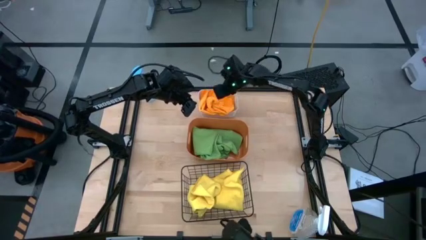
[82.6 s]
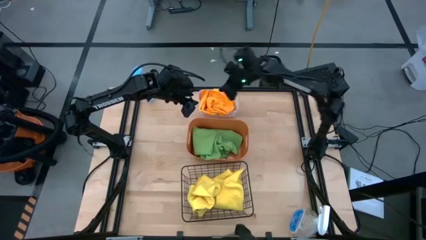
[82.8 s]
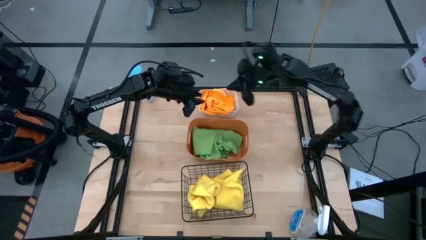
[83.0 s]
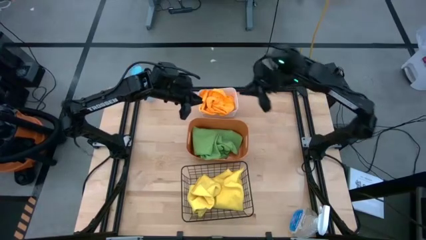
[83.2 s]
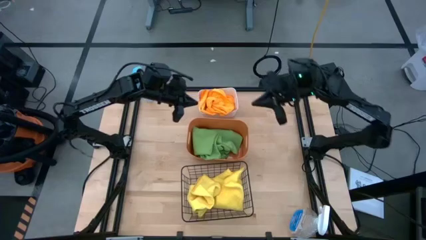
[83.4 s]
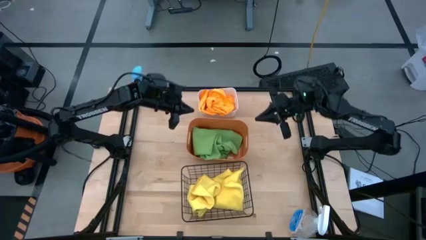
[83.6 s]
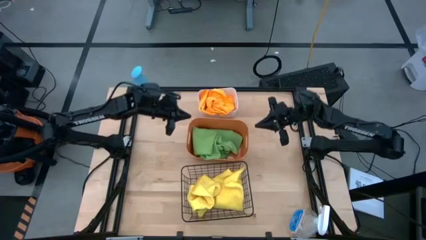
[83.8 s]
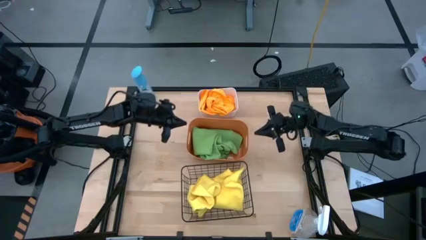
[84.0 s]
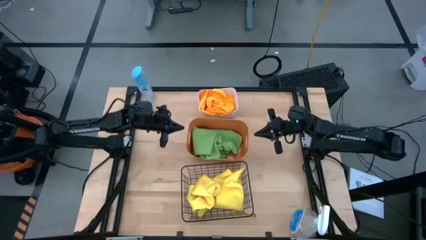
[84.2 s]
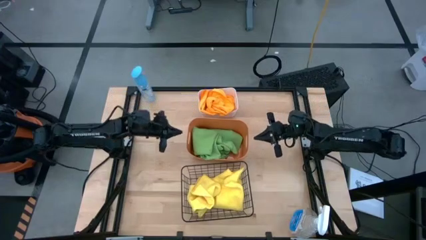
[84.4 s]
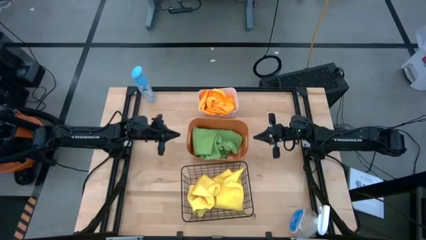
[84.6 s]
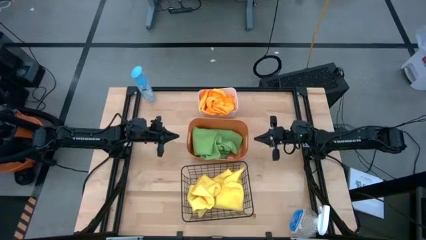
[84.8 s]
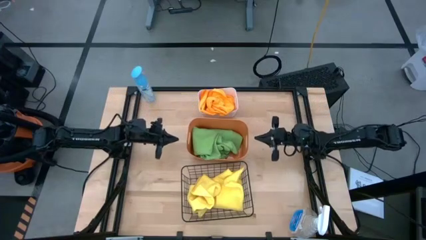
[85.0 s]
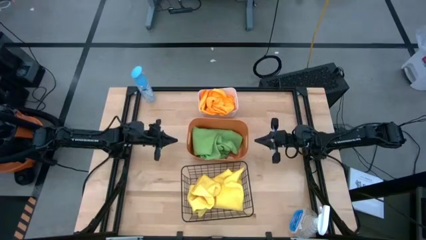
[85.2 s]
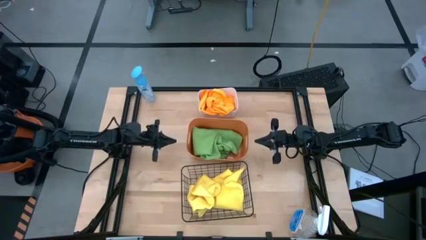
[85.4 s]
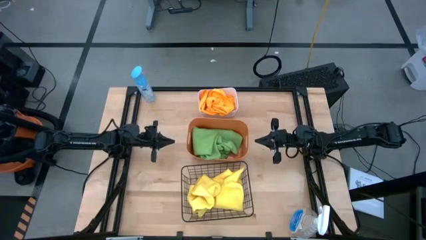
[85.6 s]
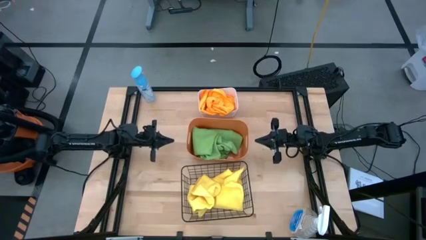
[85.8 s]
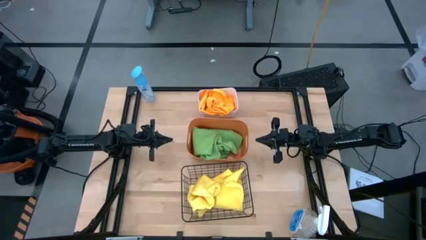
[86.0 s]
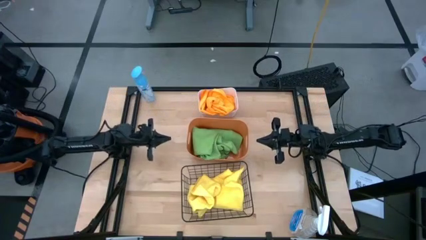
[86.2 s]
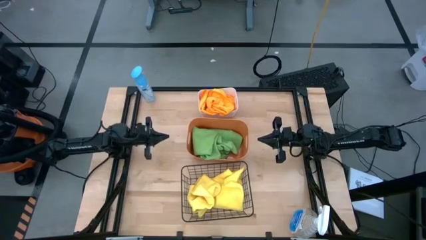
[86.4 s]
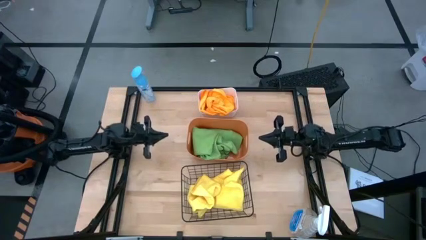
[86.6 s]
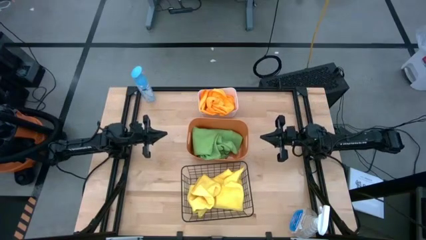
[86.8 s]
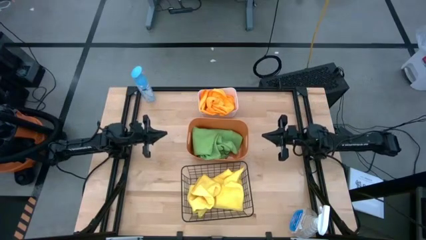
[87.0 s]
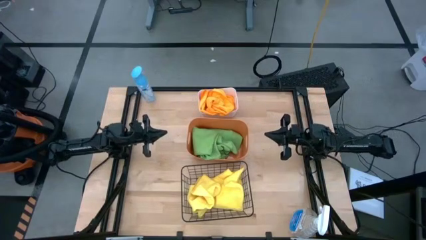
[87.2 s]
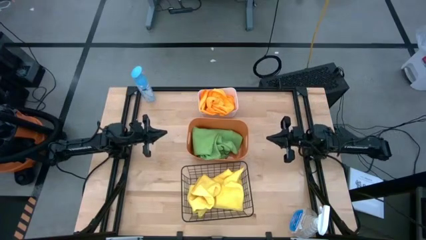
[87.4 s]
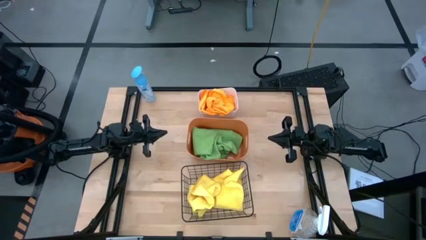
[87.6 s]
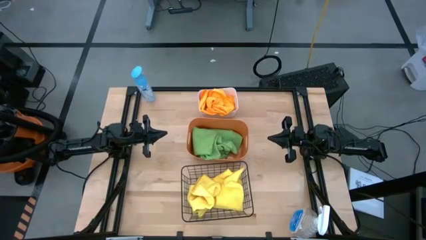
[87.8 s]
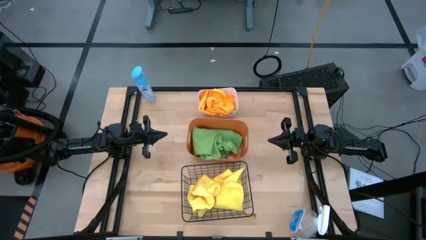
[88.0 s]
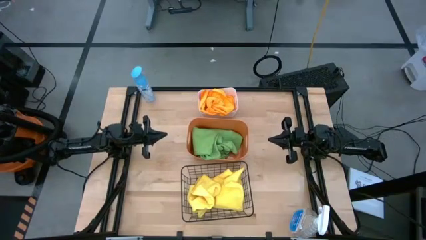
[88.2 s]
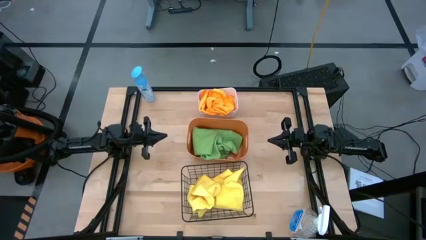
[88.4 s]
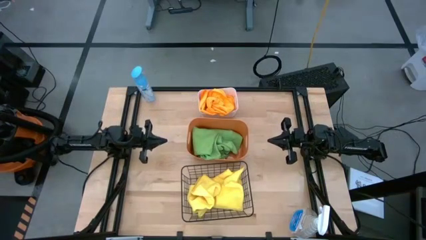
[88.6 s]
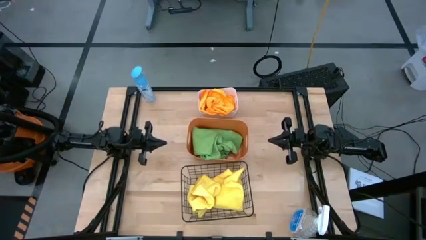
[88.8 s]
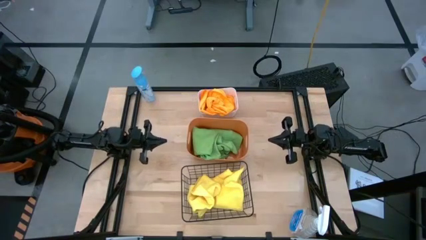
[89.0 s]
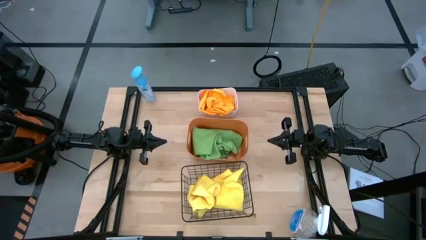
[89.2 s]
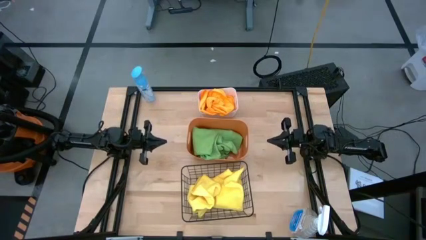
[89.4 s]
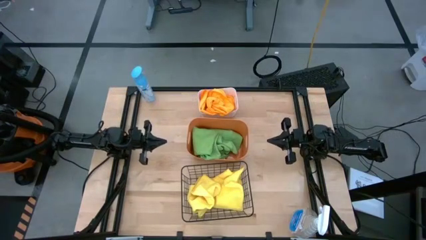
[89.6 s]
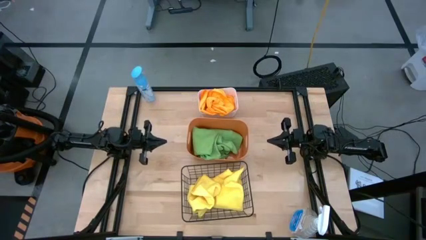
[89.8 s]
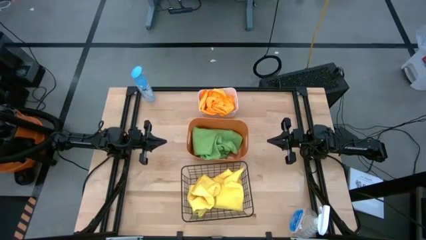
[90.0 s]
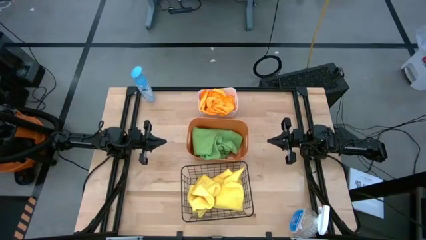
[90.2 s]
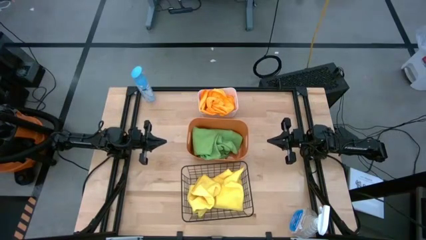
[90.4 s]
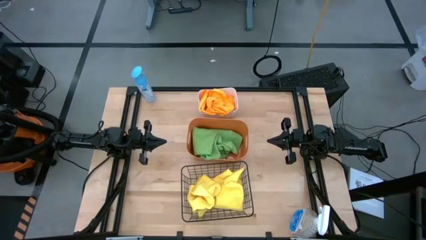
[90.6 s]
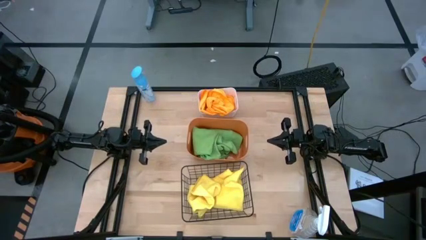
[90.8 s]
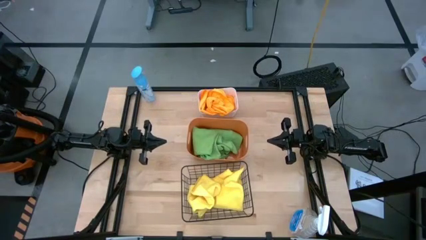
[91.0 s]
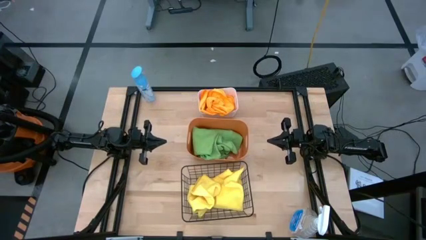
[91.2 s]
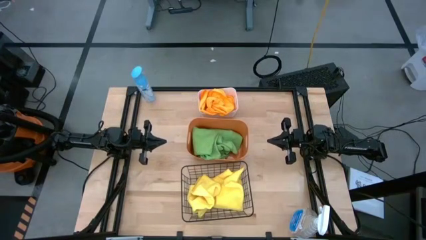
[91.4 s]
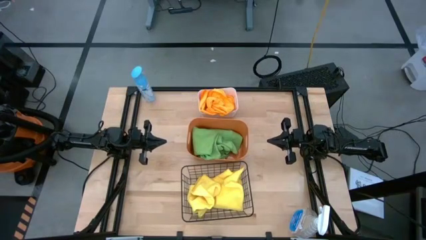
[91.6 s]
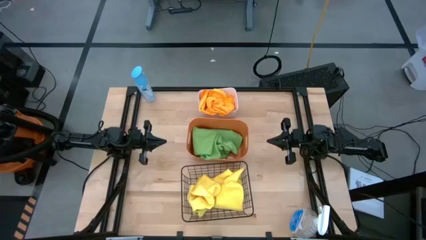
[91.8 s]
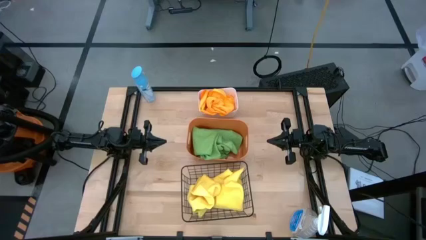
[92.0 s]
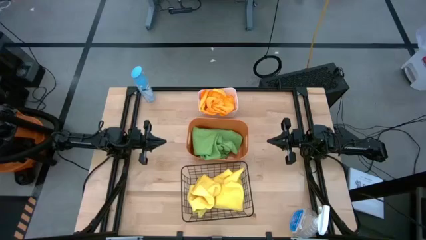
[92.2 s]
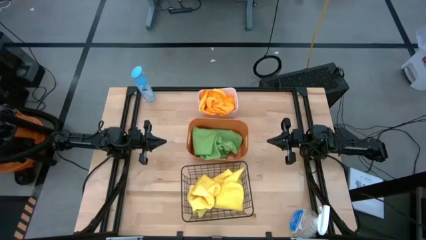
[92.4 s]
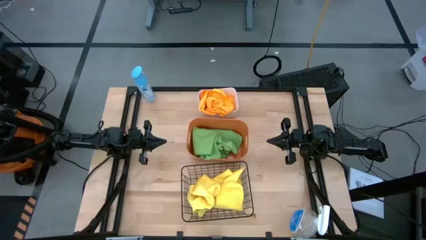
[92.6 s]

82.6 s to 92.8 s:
Task: Sort microfiber towel by color & place in baskets
Return to Home Position

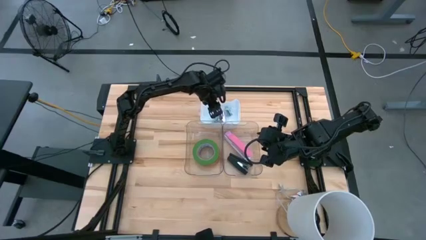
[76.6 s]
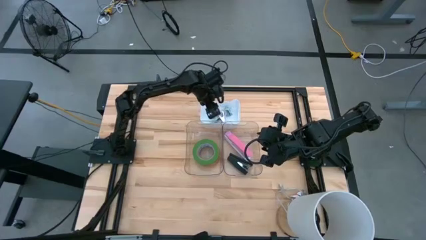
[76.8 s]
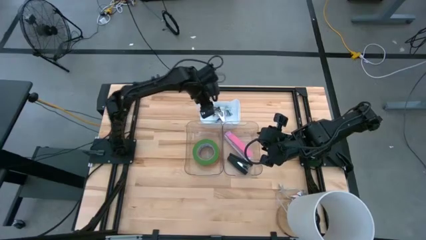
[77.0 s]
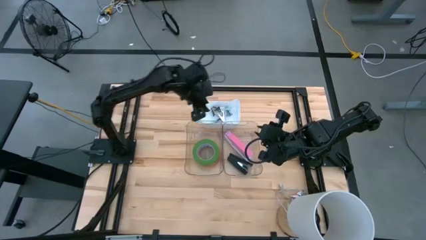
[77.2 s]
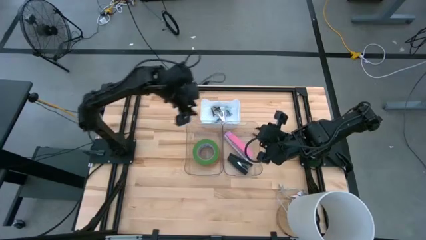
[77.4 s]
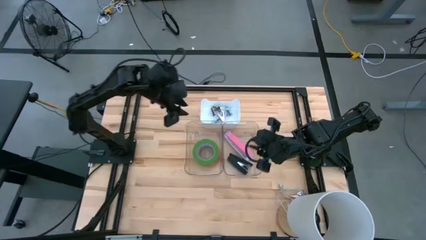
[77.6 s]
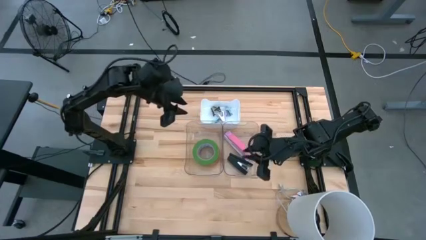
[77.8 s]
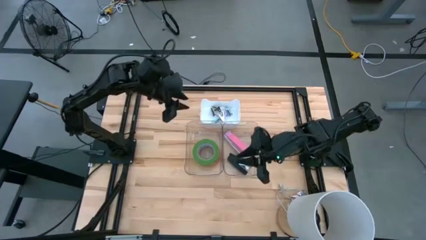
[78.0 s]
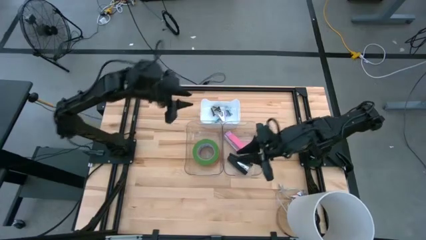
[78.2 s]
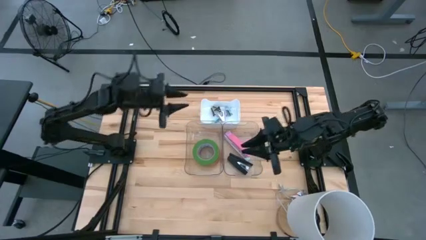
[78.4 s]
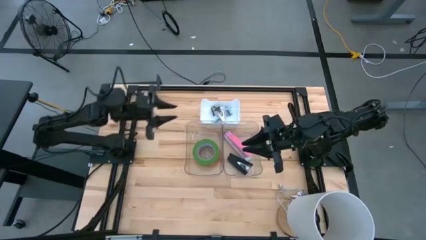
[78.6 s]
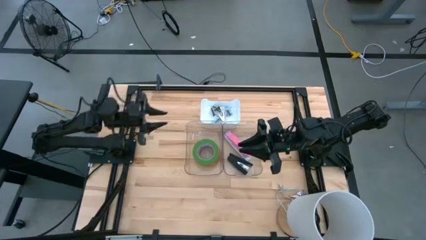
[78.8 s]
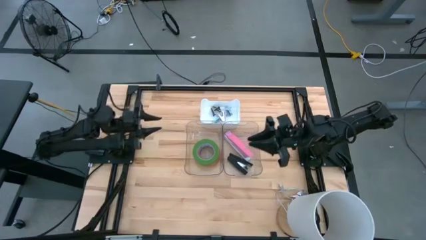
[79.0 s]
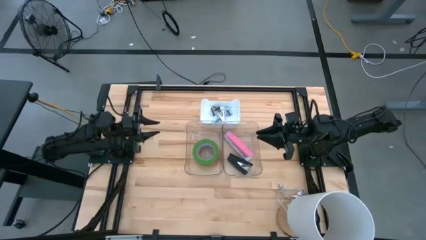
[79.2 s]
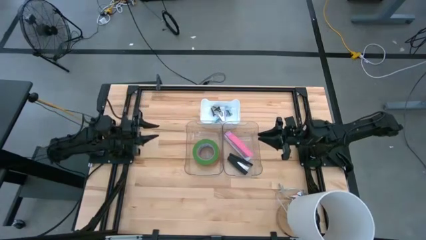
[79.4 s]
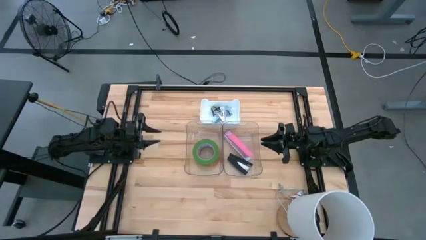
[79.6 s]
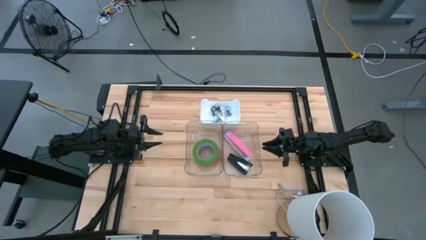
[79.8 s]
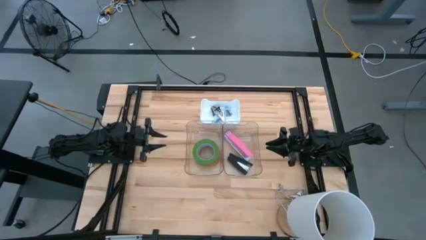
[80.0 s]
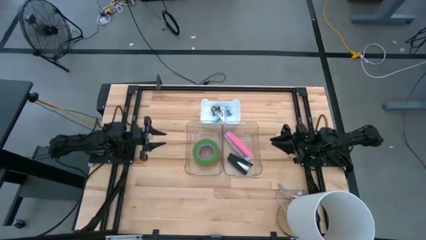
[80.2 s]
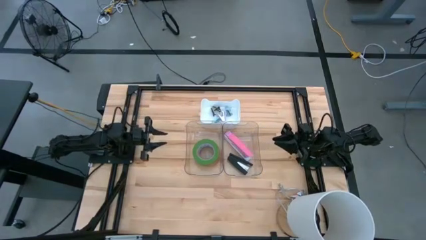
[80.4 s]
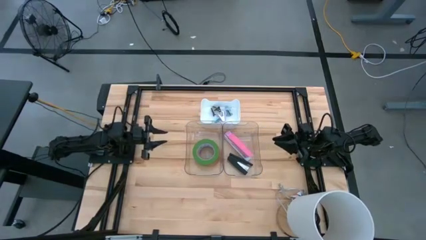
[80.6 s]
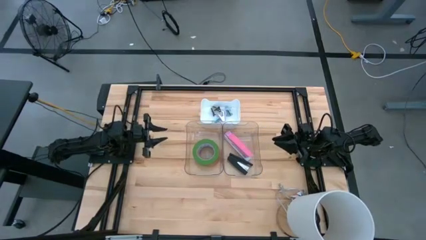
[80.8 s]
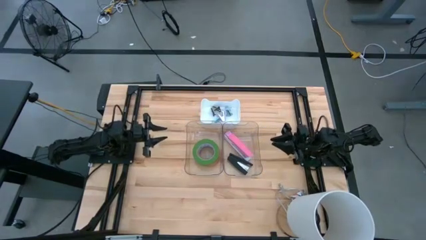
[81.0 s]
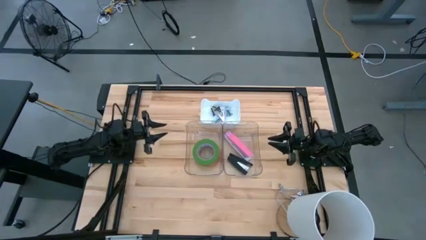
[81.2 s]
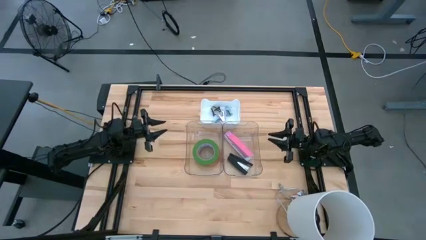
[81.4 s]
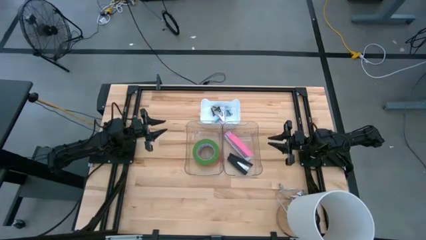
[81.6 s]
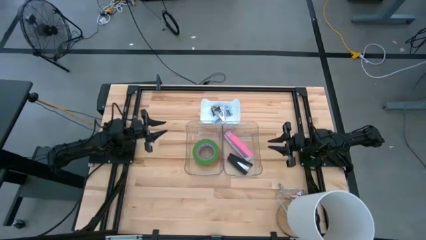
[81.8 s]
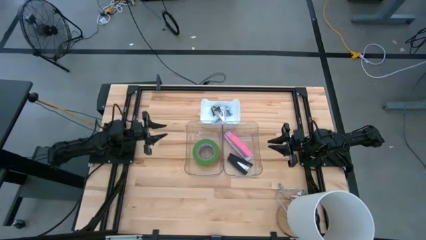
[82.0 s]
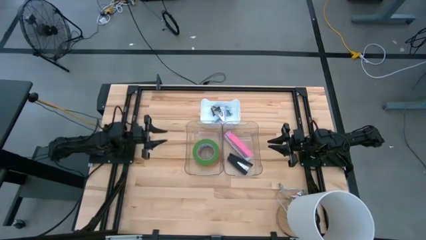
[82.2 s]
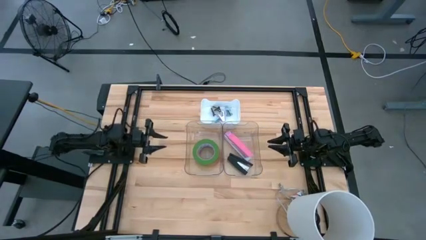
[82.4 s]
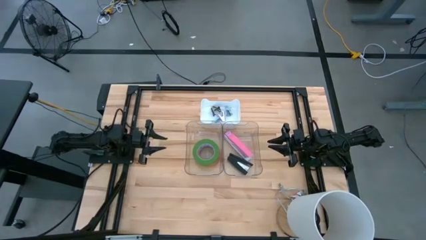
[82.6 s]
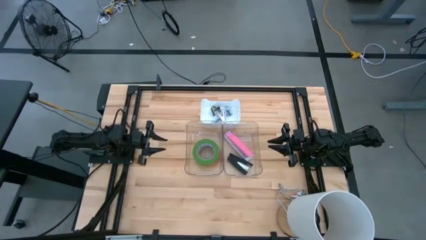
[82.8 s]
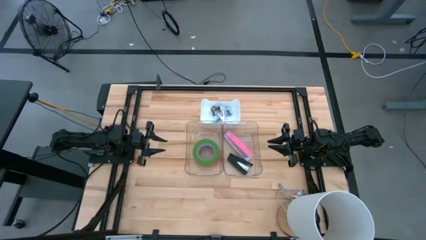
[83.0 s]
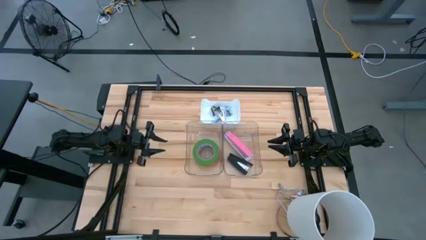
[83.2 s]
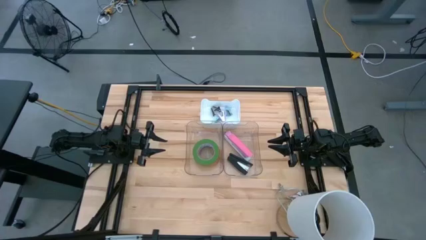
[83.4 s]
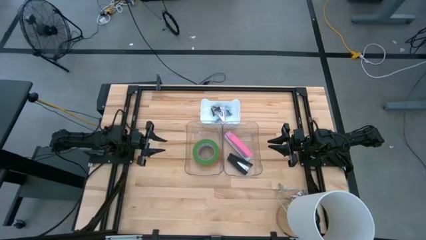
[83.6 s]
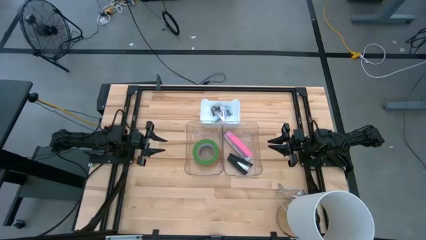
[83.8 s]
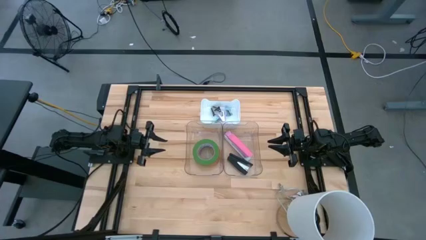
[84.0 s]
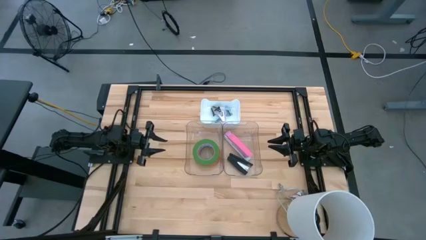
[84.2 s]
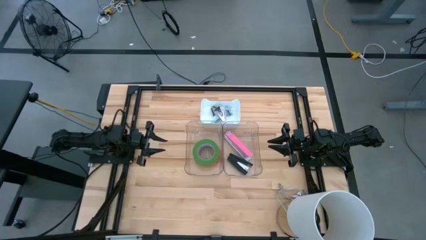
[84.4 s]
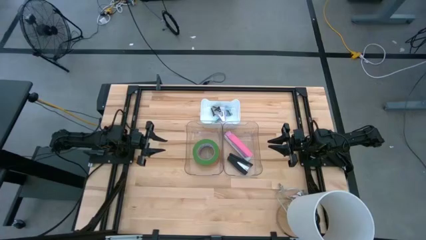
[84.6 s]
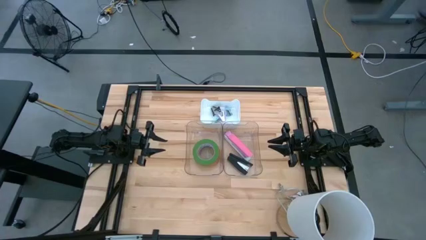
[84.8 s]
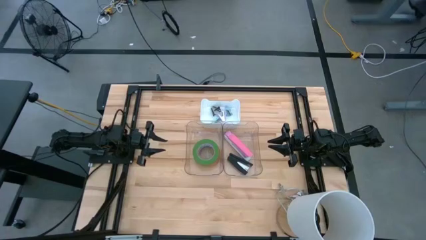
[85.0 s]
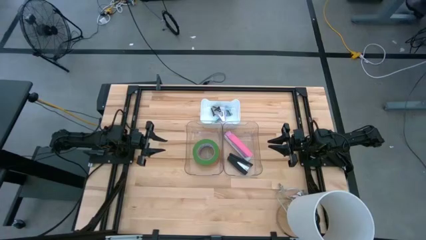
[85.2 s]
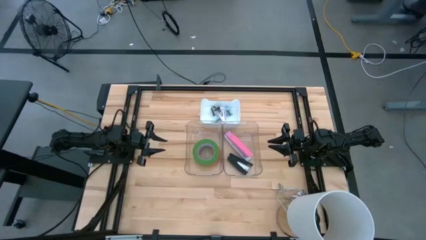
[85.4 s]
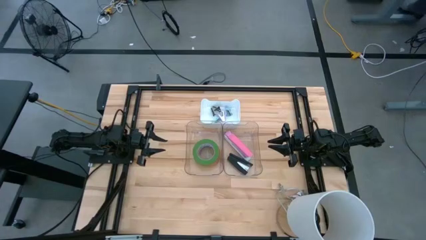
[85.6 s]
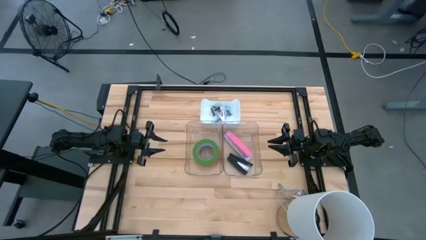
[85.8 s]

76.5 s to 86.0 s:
Task: Pick and place Stapler, Stapler remover, tape
Return to Home Position
